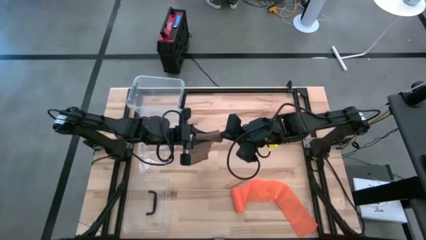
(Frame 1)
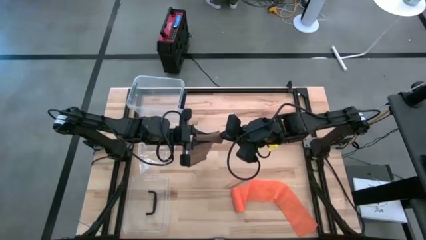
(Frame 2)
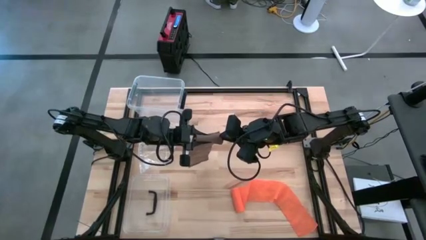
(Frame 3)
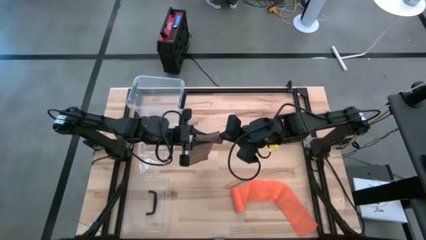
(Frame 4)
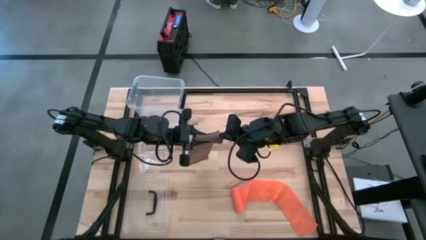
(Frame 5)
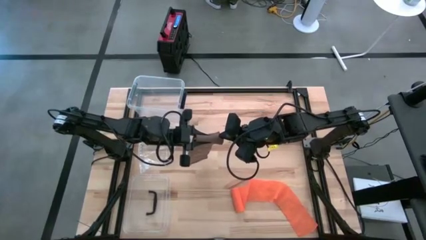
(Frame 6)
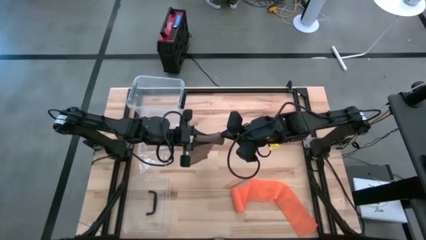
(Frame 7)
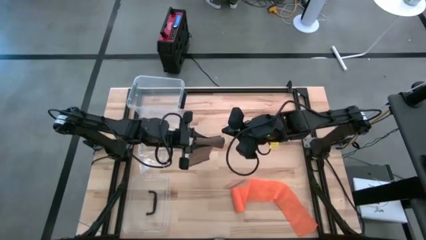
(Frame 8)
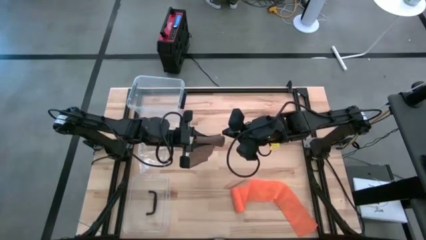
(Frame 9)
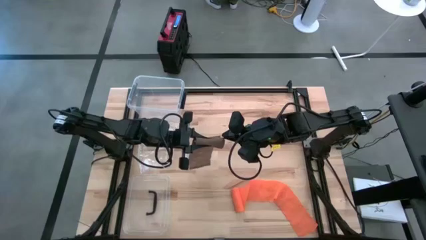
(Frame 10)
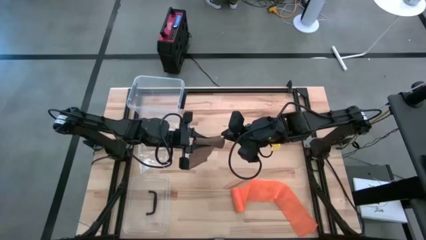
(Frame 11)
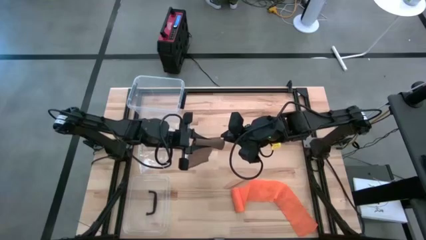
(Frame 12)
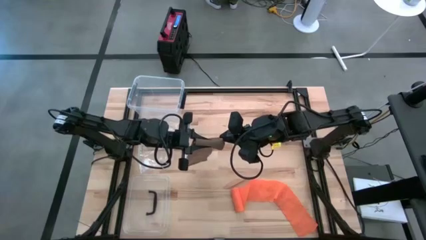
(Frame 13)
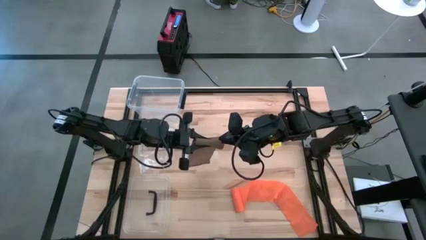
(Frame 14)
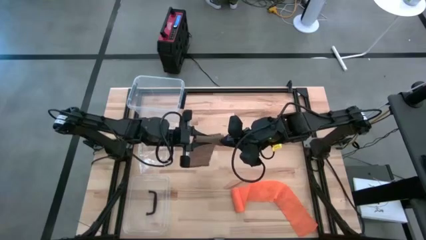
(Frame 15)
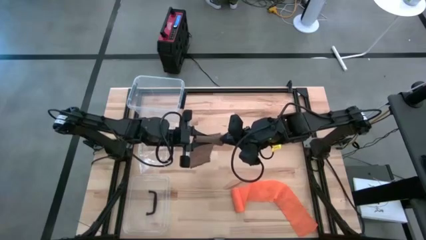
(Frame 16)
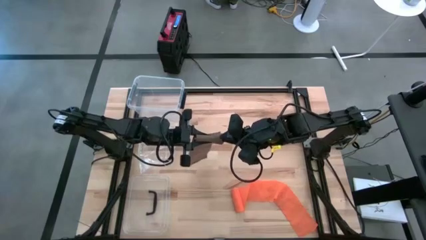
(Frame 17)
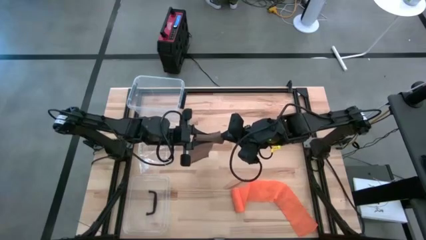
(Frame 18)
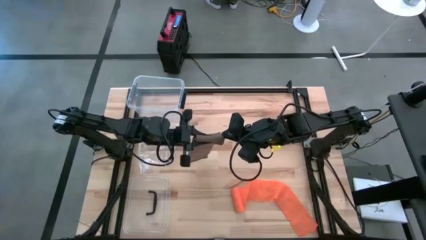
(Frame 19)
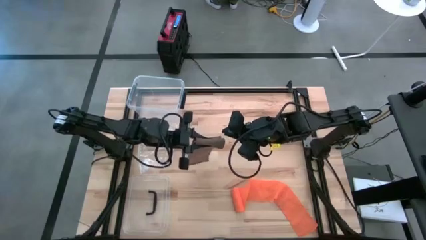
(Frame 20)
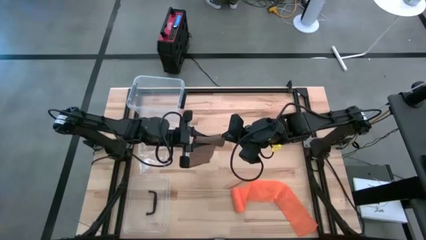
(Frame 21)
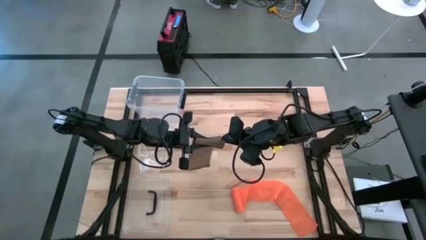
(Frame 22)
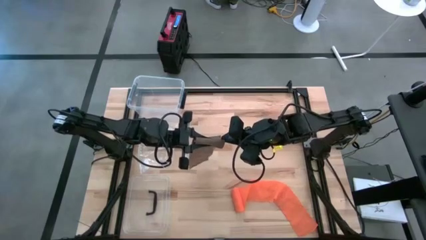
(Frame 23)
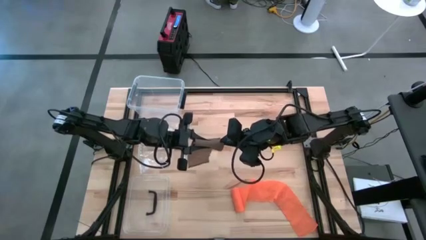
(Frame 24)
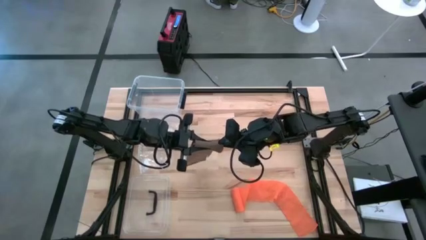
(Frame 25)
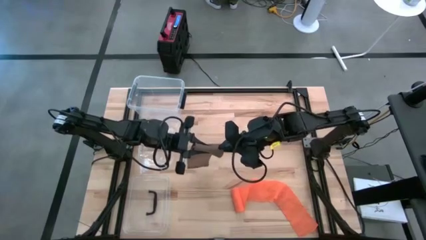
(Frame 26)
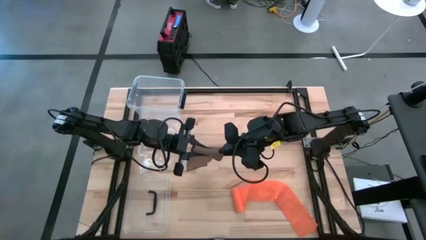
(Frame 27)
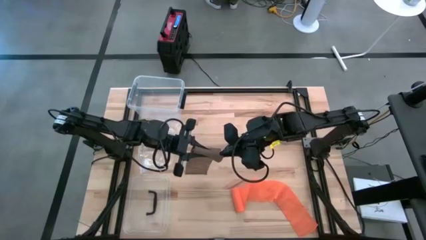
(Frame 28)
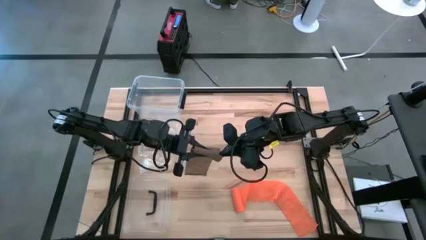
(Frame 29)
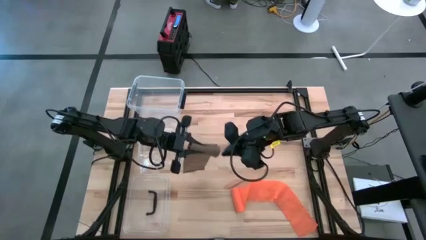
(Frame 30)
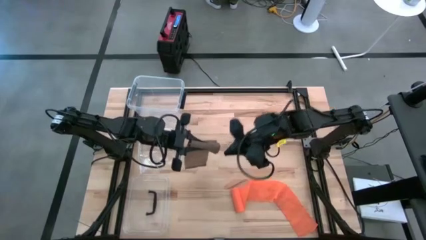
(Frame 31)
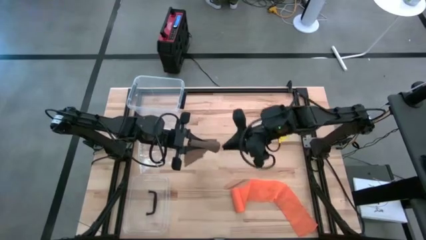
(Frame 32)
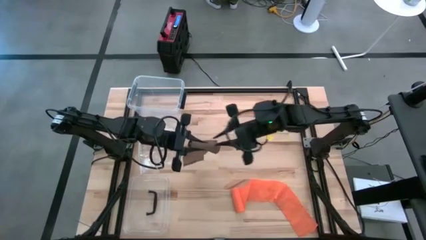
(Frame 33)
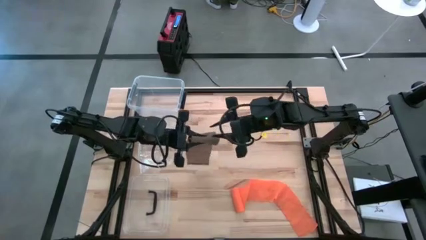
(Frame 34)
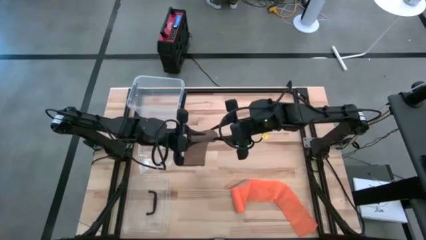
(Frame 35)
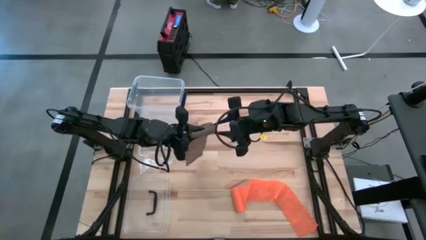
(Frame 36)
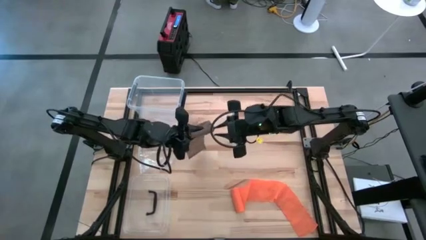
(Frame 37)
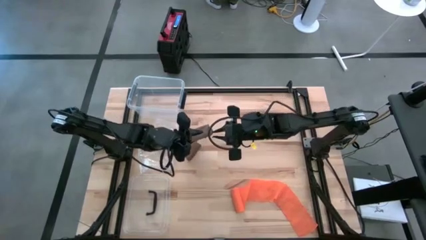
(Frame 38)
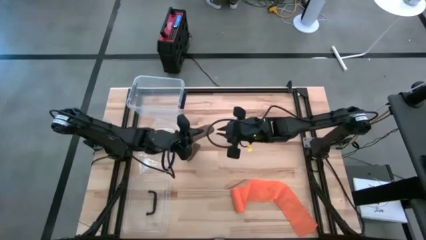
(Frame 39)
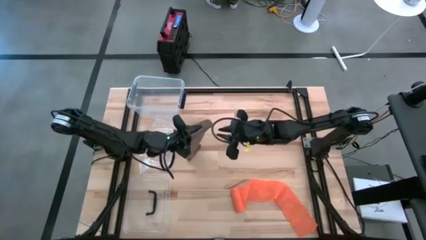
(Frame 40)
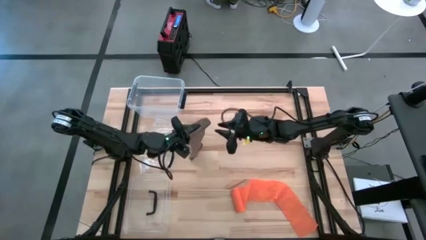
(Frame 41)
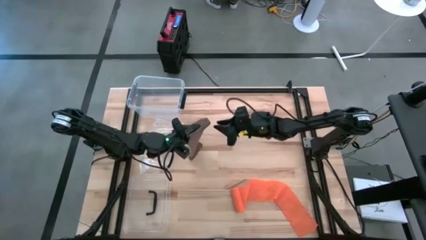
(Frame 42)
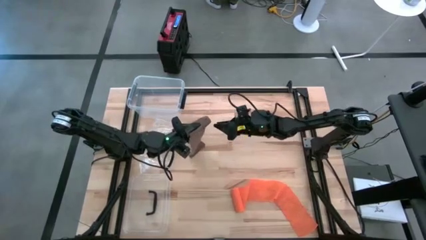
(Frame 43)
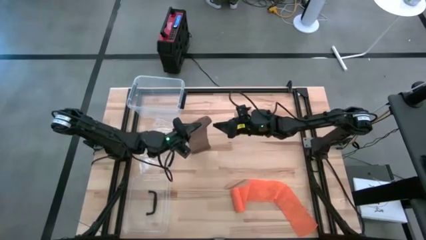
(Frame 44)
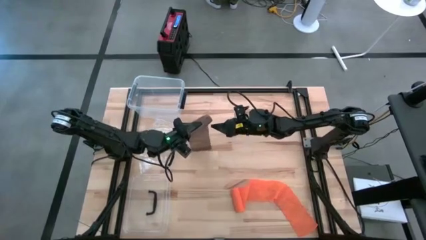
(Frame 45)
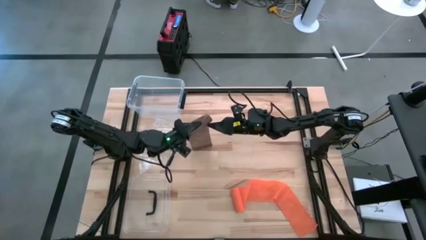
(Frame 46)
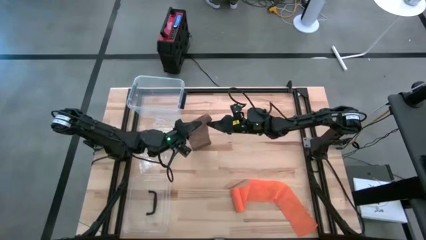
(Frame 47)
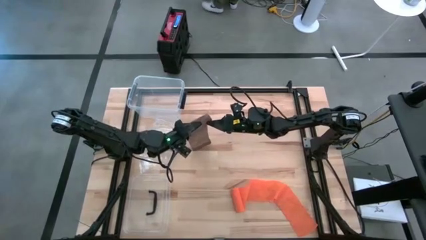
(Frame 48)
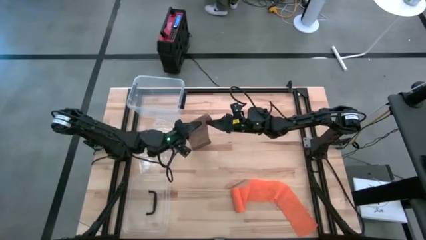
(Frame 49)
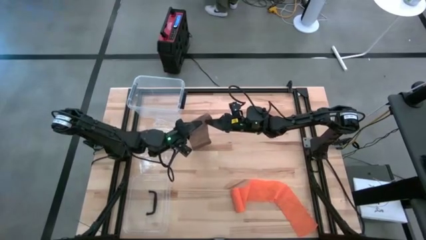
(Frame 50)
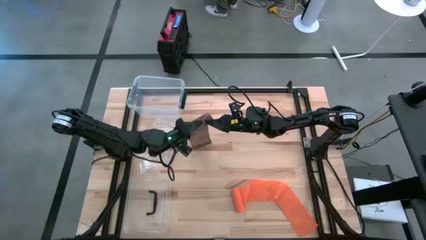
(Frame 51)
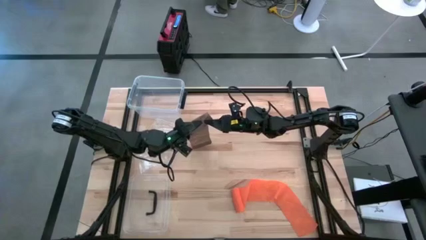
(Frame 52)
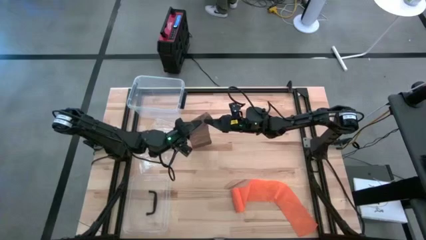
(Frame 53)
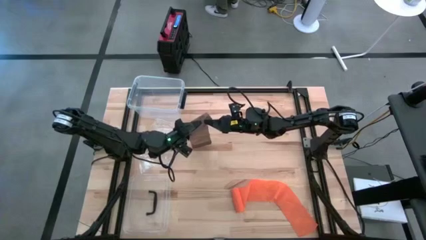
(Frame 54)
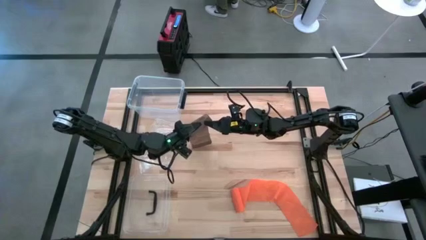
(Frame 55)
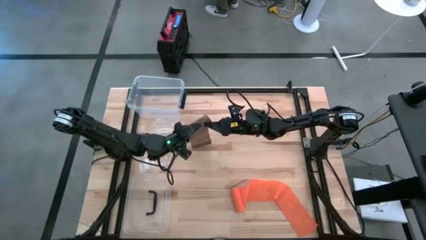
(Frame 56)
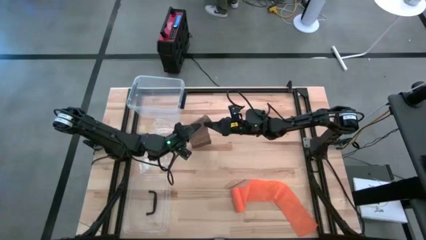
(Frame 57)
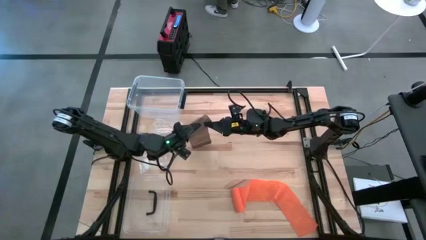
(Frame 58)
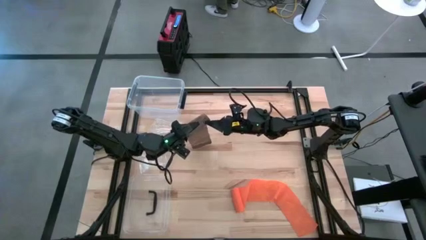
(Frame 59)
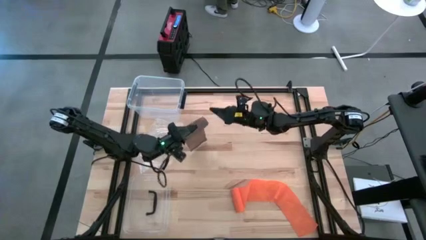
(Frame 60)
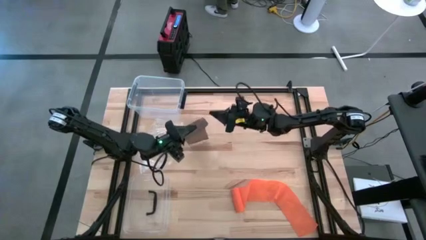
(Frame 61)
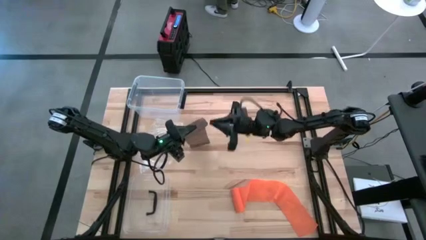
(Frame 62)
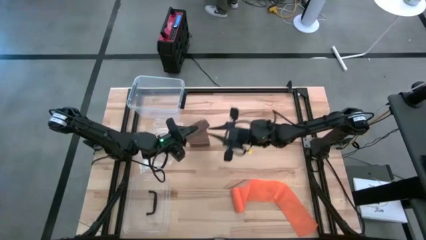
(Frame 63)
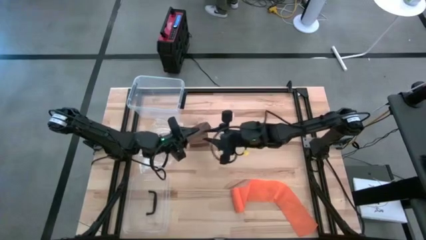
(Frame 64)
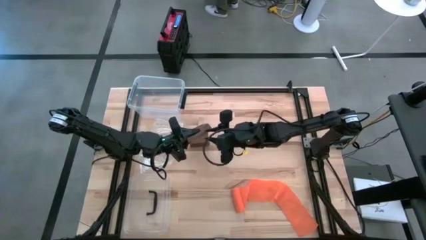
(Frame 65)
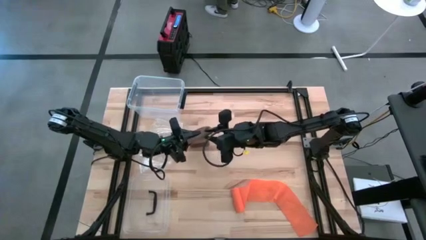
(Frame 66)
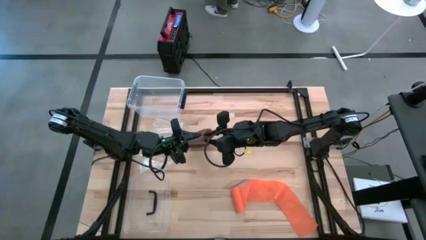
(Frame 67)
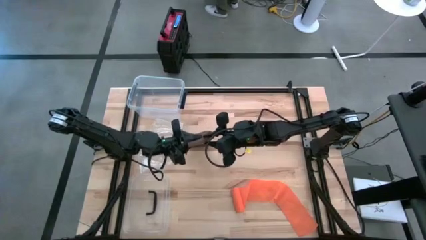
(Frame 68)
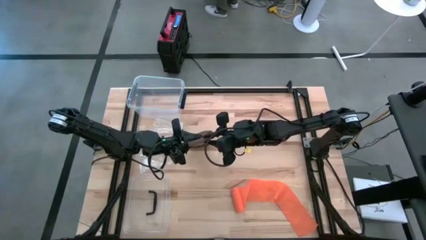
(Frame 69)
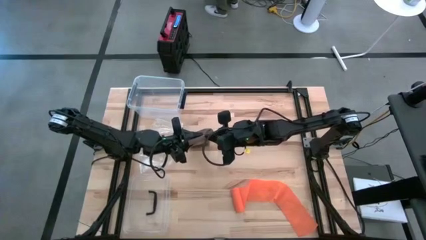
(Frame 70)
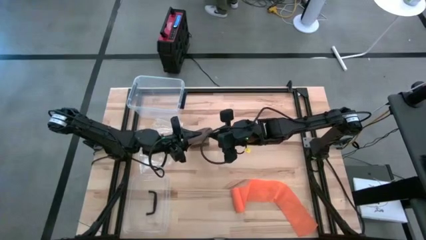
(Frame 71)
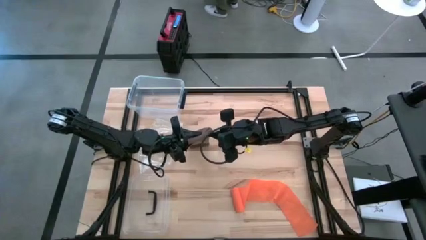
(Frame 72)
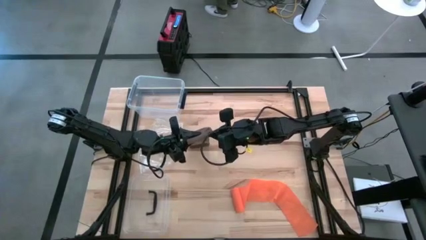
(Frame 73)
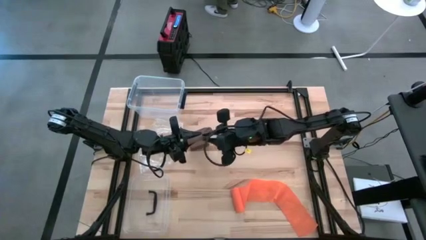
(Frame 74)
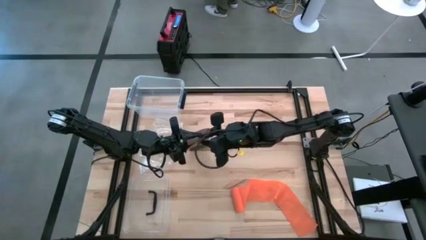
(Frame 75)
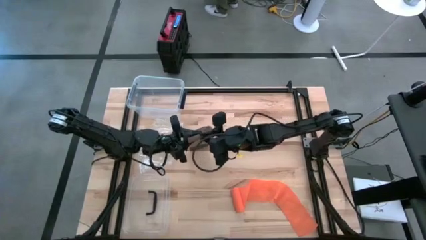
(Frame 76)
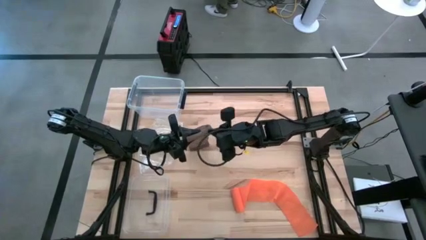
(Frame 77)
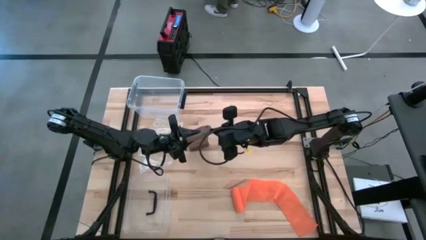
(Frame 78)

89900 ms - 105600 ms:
Task: Roll bandage
Roll the brown bandage
